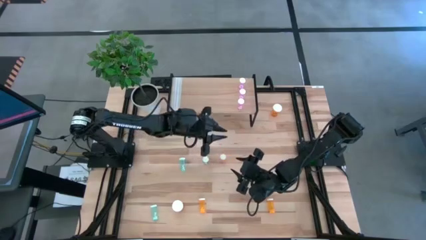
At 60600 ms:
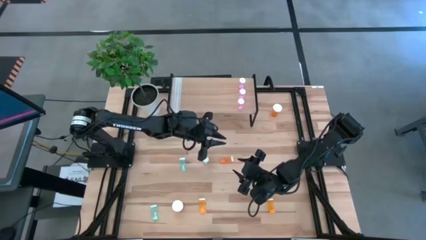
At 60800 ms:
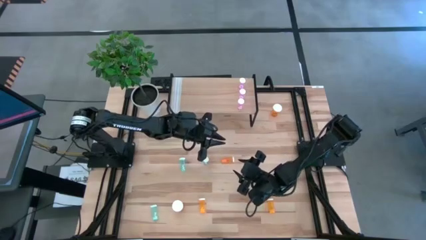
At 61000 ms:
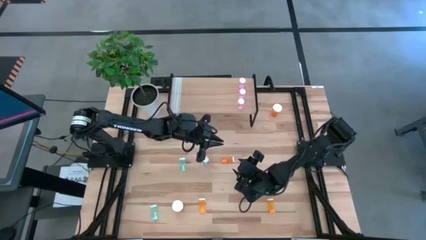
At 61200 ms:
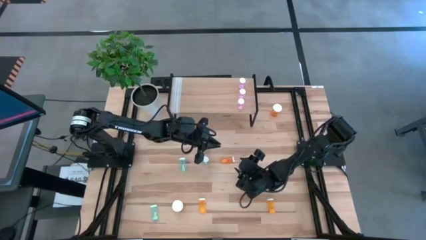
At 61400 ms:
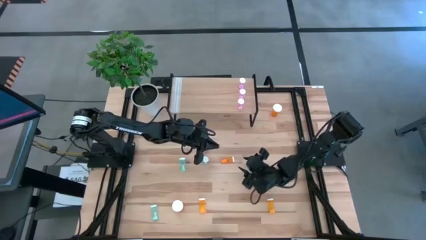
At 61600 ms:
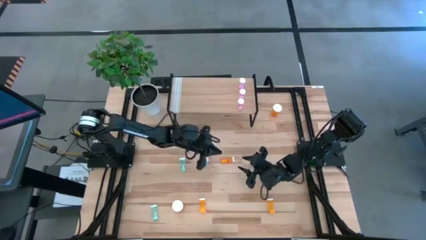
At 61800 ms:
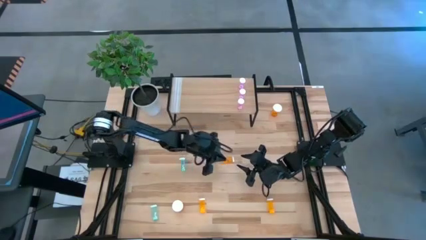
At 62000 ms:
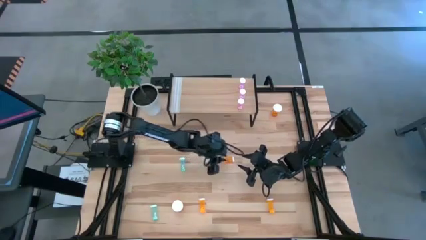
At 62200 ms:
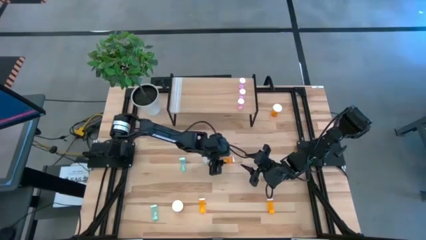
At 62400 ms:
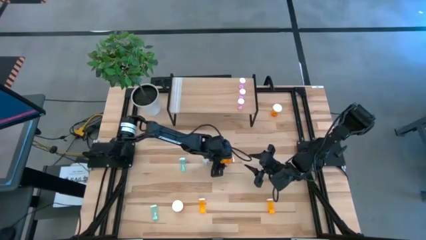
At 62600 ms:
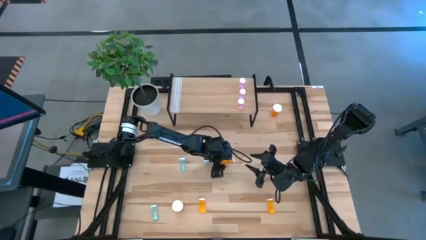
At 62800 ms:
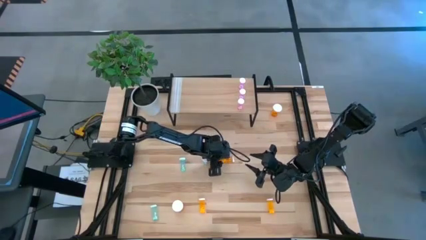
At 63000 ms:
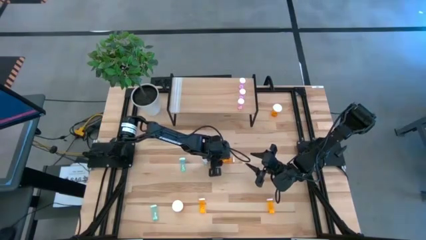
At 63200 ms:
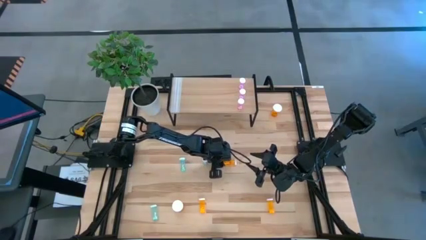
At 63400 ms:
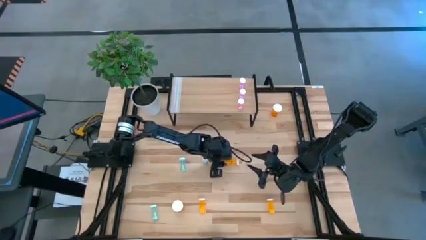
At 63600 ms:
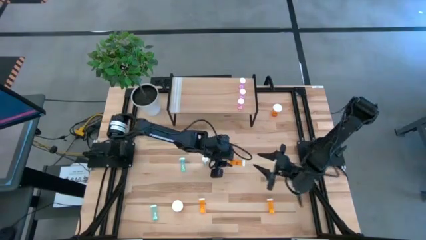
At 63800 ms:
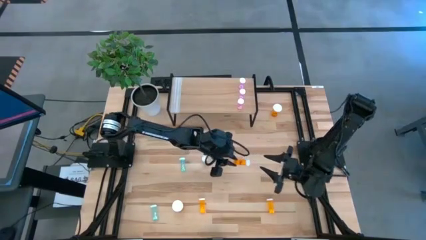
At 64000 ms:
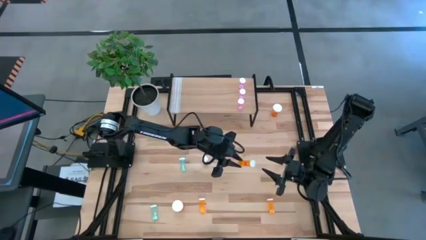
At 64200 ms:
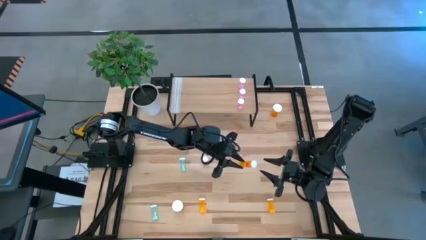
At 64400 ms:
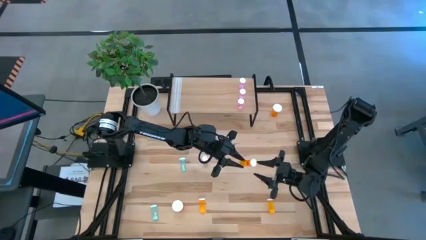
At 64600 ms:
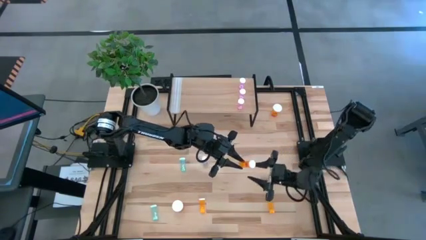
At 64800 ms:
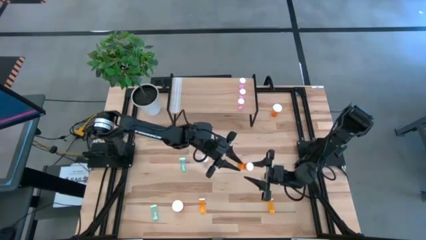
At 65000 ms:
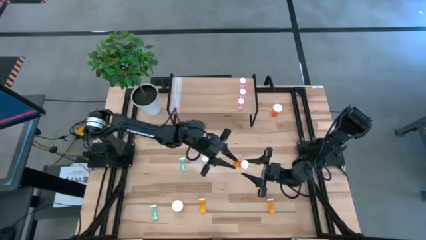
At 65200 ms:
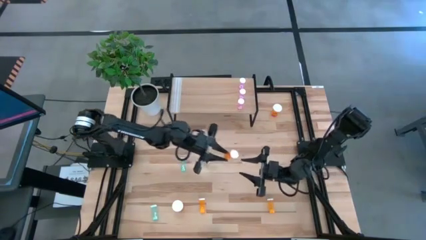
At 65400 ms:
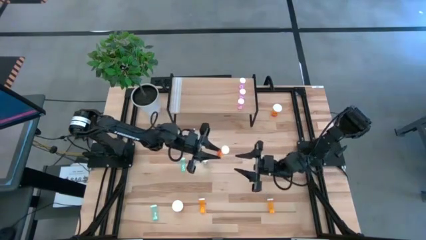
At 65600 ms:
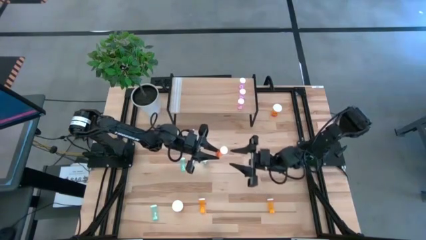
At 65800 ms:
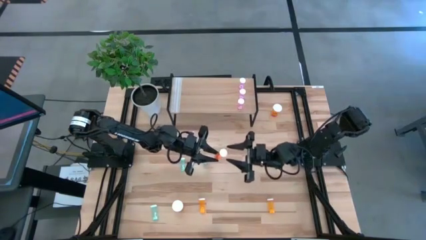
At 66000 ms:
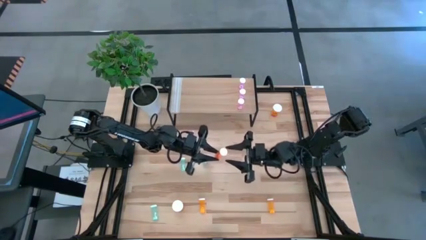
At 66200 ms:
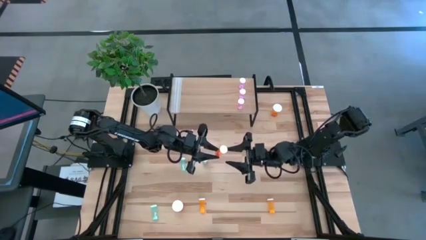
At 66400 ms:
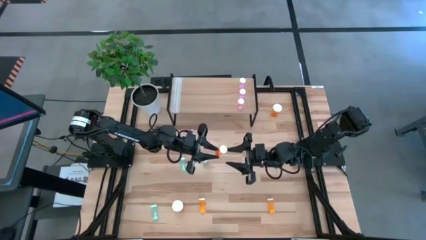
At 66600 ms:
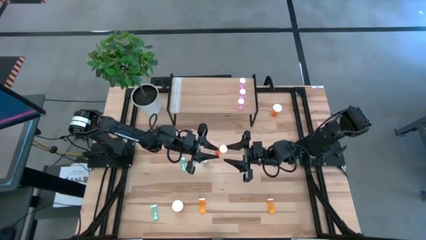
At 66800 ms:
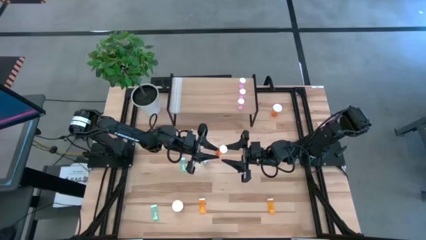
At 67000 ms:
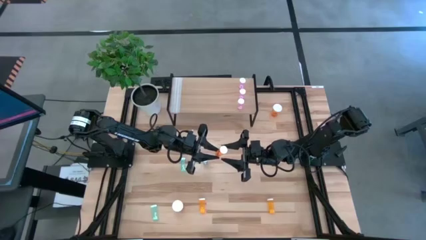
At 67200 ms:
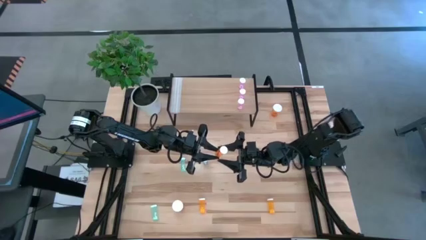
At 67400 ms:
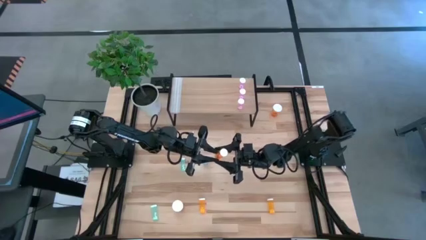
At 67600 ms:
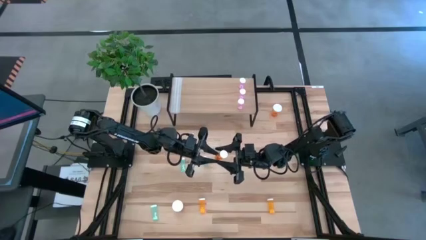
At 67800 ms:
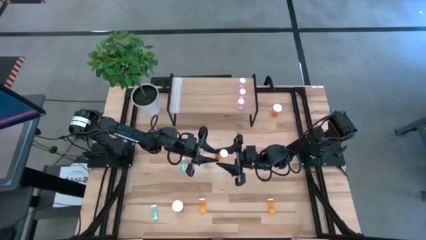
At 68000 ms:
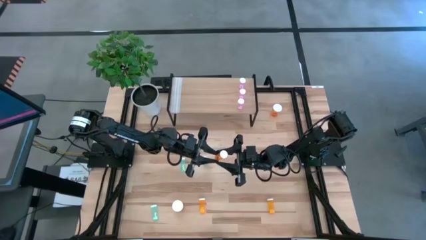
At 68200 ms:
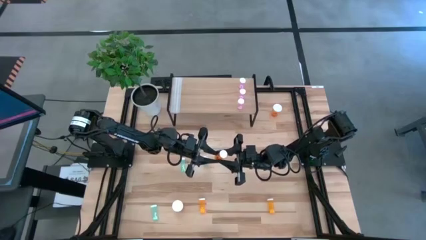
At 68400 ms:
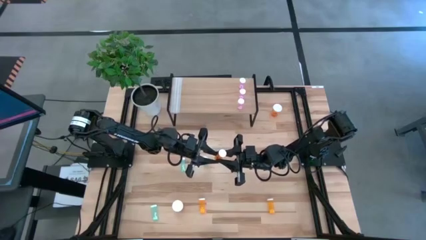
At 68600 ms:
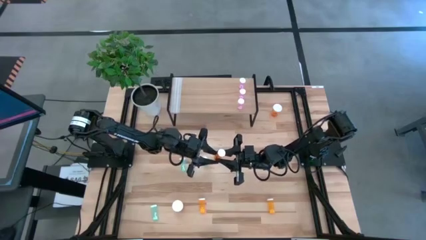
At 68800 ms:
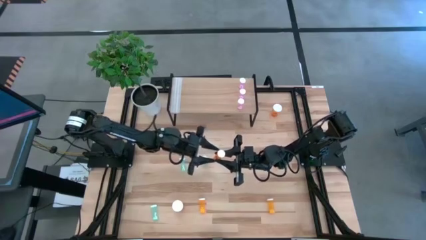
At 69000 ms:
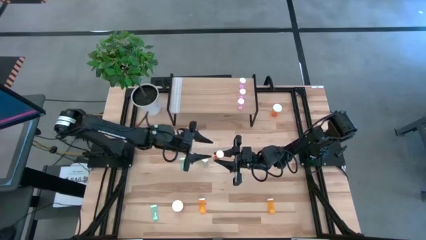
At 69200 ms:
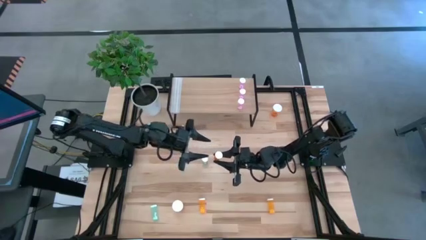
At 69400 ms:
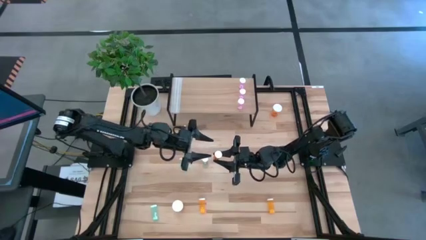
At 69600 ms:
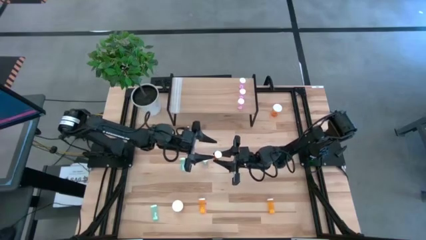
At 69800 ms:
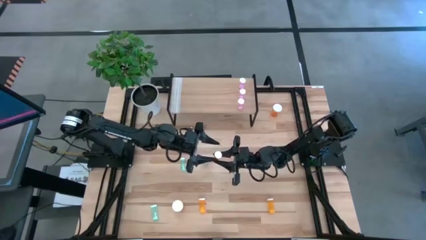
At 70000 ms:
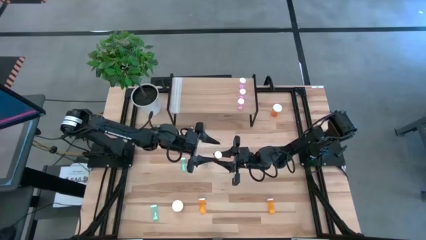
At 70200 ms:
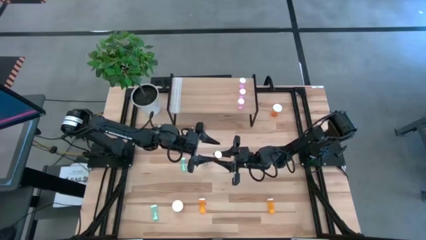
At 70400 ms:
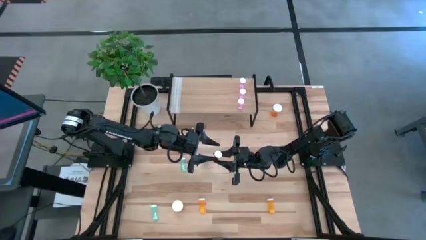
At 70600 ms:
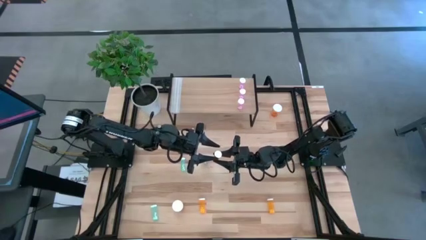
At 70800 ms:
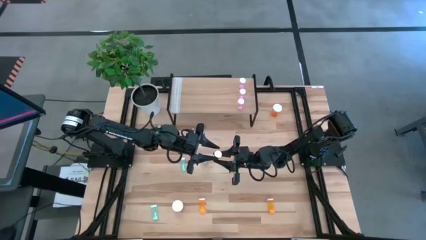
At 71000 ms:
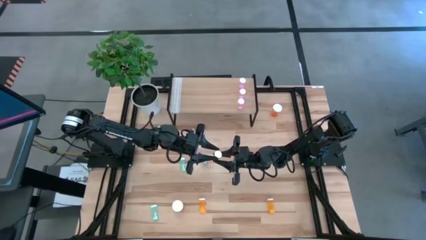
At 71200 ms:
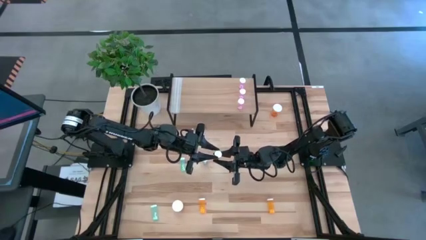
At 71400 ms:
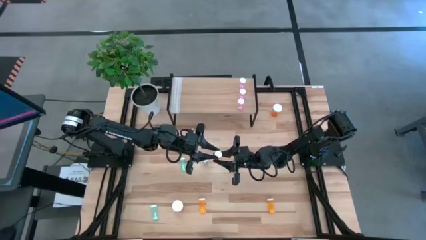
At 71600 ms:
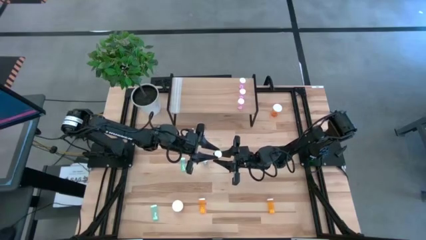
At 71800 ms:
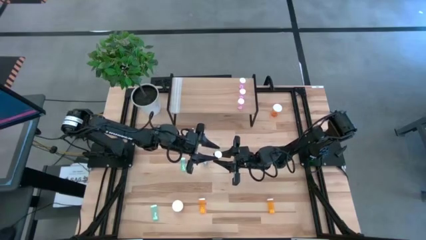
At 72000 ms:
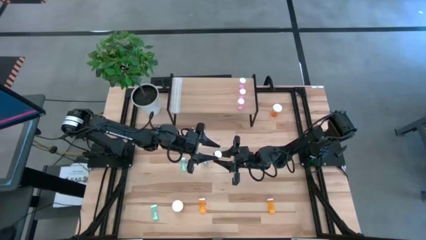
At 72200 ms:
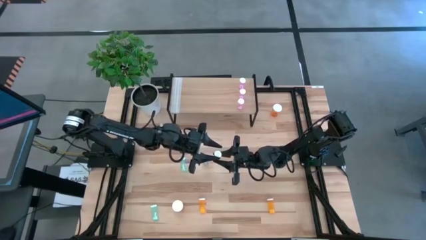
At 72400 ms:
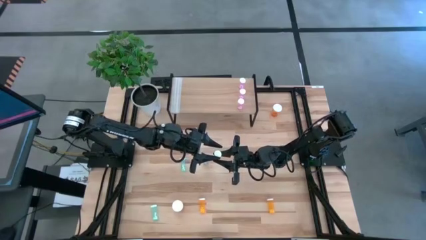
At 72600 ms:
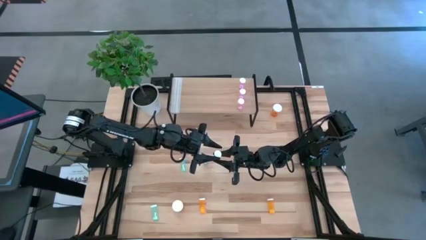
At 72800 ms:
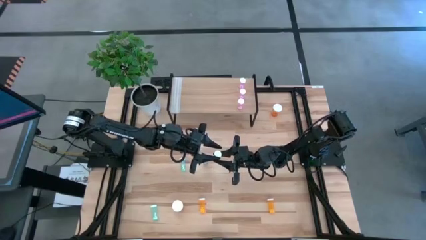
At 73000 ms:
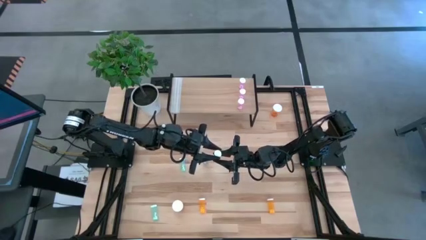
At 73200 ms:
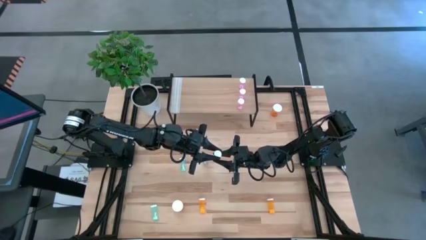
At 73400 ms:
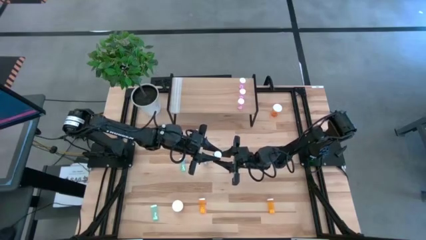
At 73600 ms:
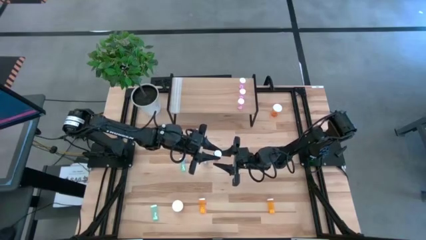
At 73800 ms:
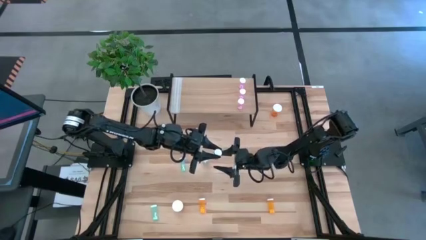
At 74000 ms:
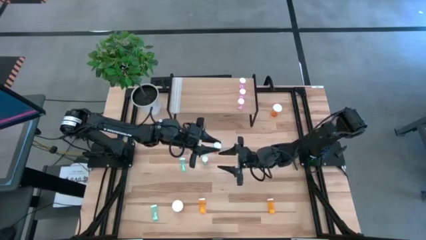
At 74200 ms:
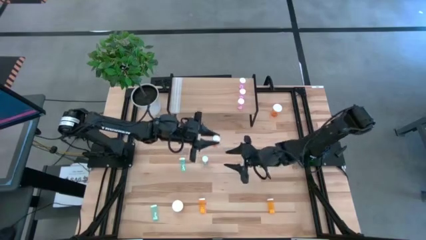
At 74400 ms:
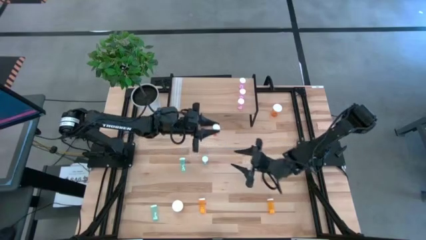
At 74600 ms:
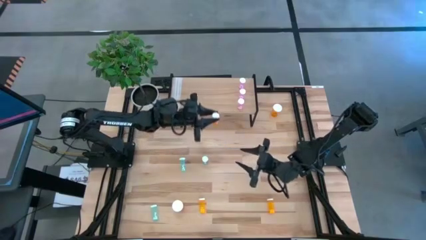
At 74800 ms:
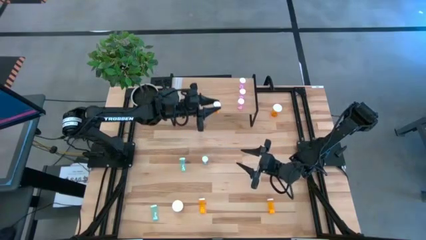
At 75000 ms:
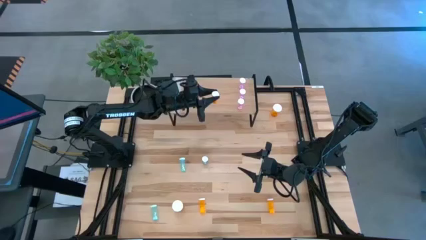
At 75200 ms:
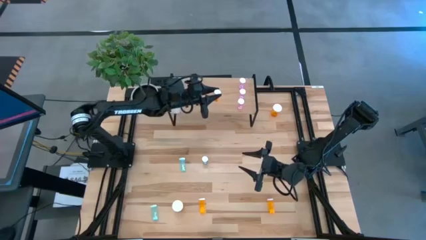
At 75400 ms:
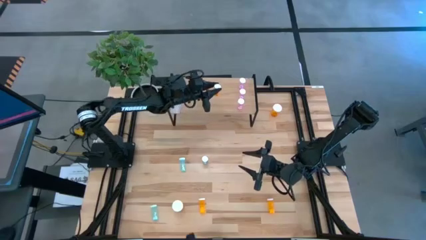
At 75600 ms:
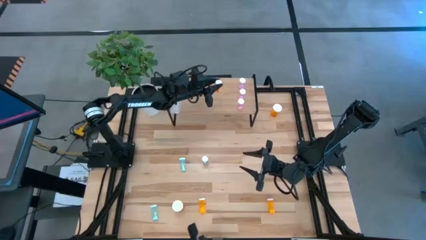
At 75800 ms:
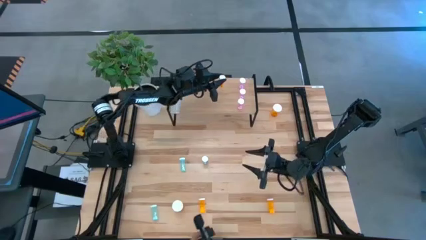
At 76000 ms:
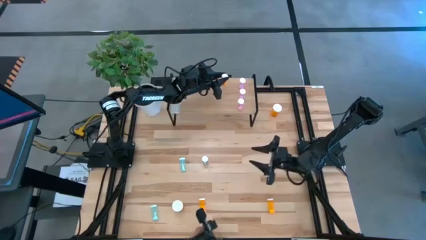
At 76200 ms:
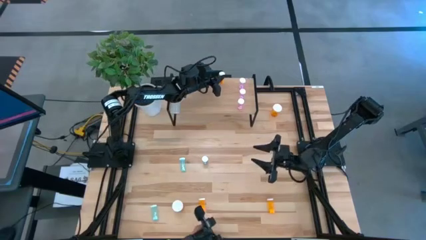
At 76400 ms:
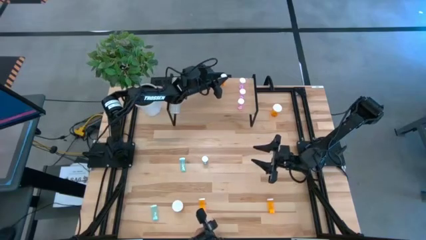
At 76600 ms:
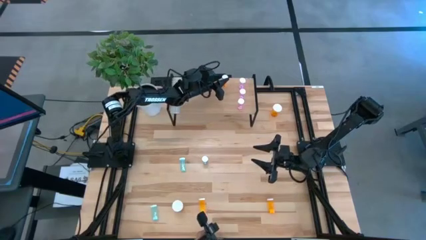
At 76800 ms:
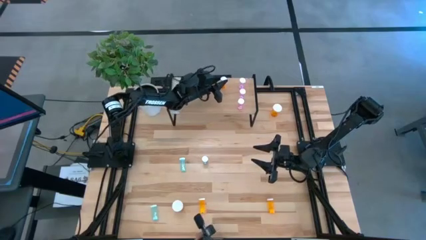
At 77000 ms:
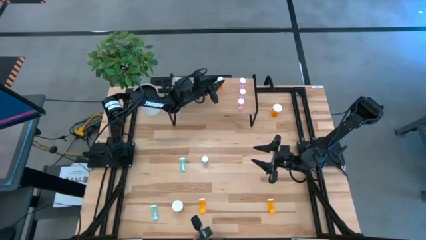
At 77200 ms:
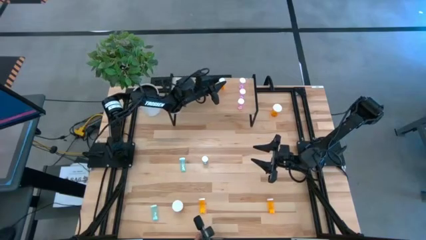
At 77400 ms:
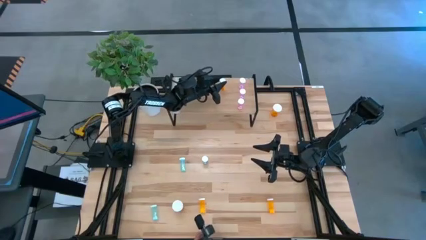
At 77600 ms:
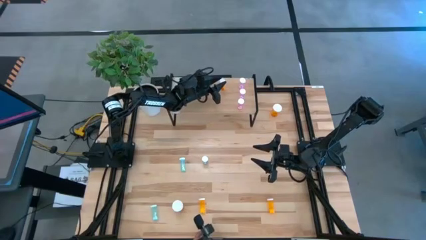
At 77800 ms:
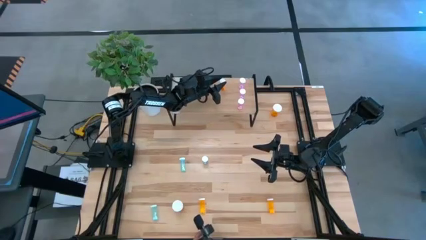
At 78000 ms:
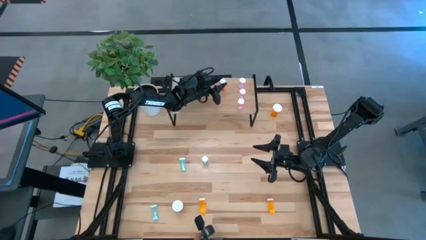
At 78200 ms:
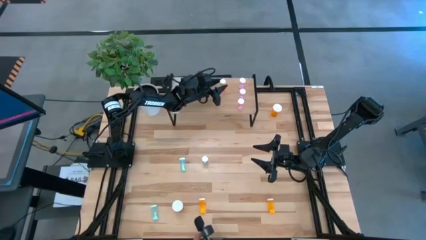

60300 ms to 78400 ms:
Task: Pick and place medicine bottles onto shelf by color
Put the middle orange pill bottle on the shelf
